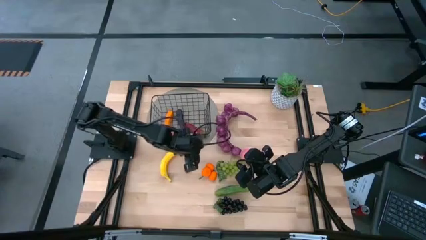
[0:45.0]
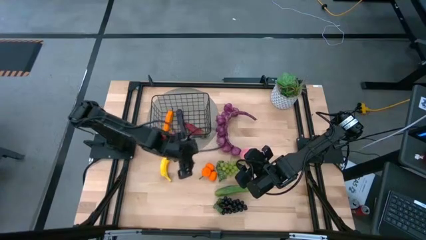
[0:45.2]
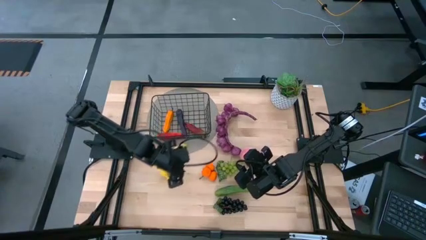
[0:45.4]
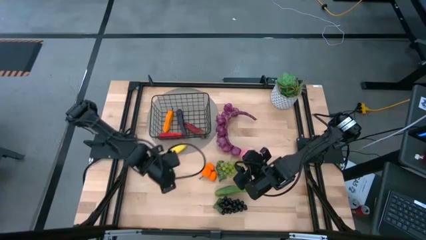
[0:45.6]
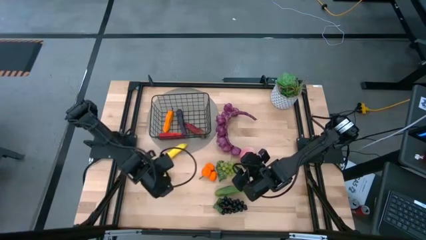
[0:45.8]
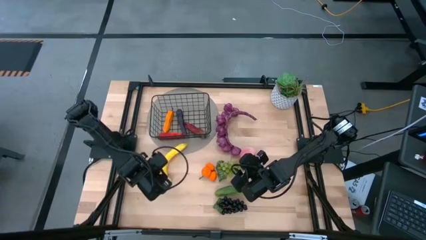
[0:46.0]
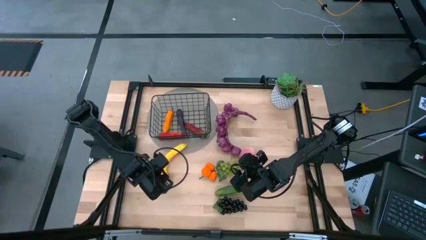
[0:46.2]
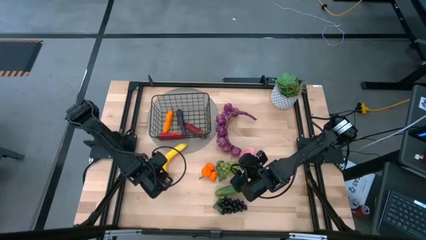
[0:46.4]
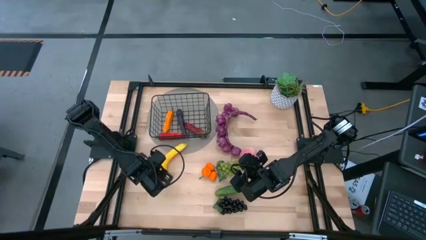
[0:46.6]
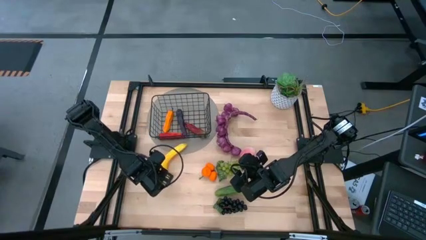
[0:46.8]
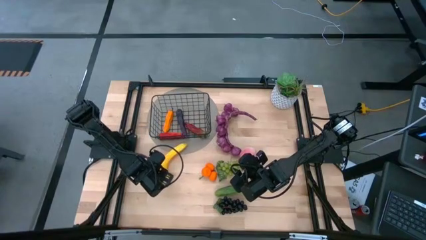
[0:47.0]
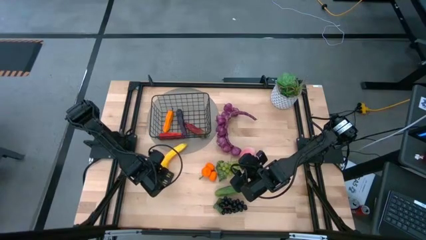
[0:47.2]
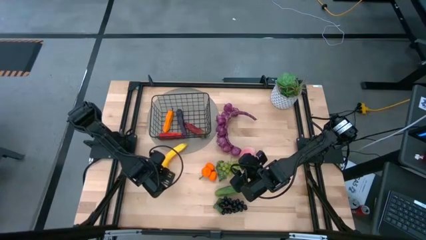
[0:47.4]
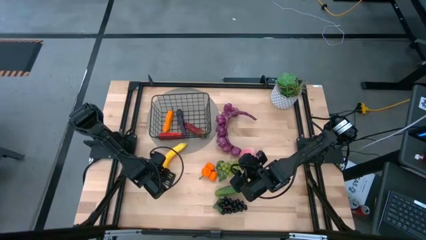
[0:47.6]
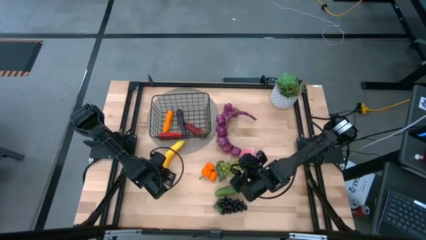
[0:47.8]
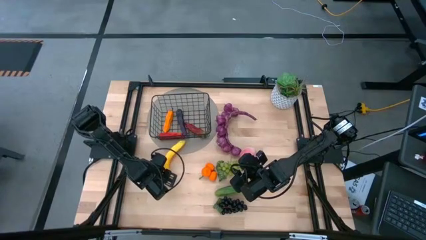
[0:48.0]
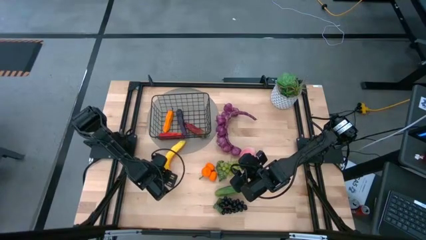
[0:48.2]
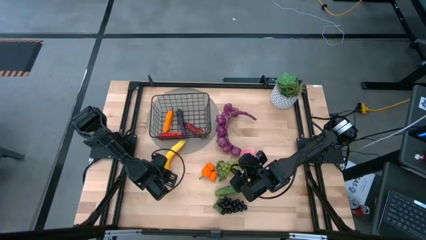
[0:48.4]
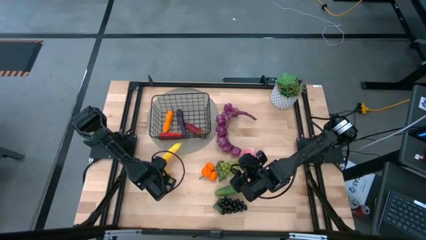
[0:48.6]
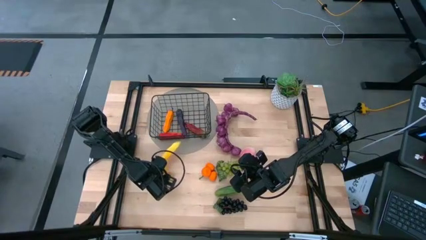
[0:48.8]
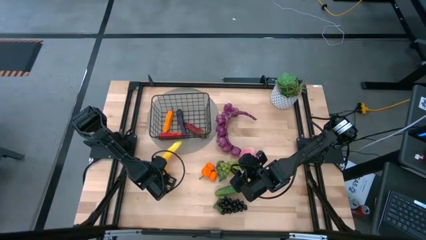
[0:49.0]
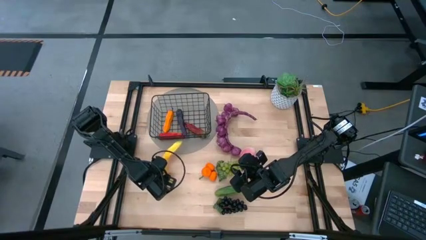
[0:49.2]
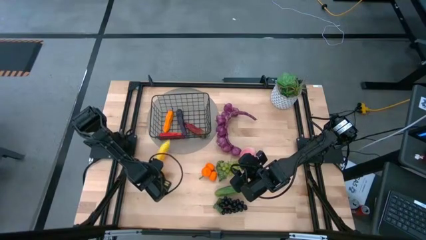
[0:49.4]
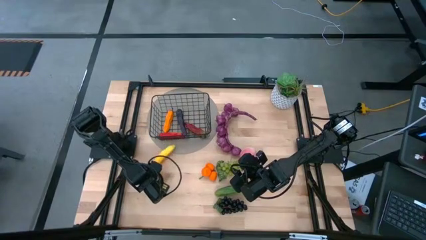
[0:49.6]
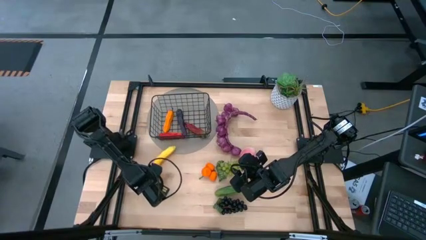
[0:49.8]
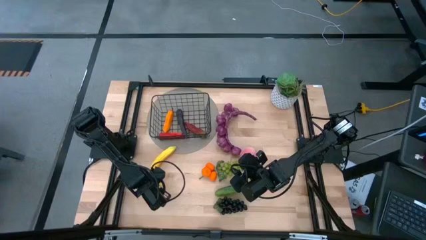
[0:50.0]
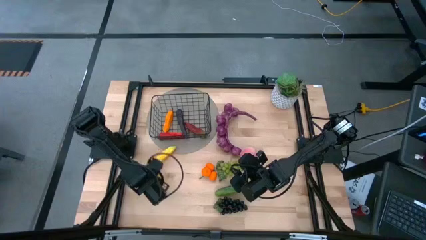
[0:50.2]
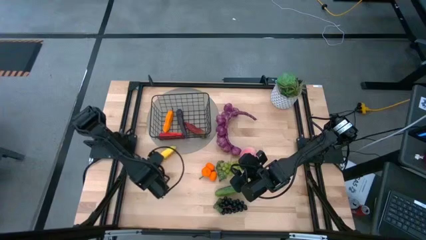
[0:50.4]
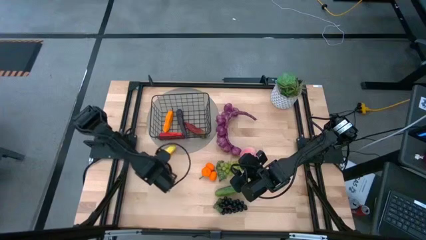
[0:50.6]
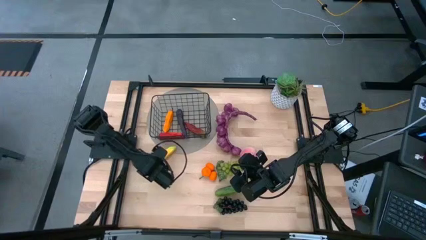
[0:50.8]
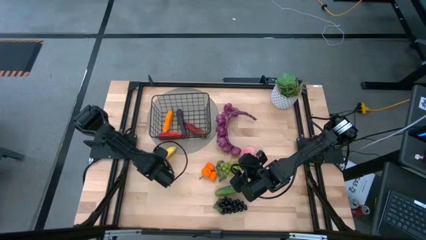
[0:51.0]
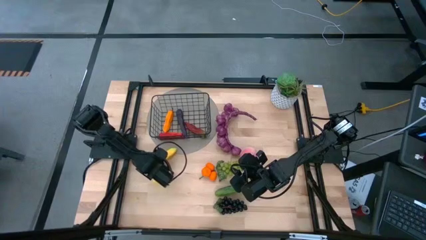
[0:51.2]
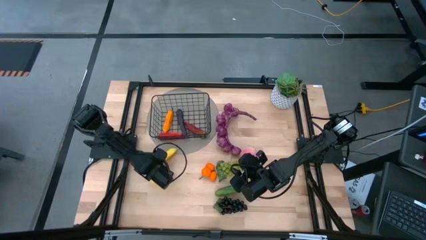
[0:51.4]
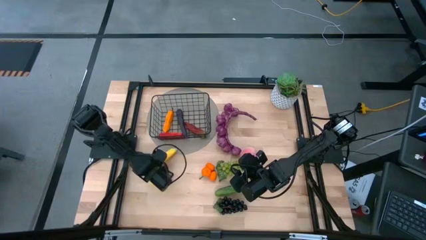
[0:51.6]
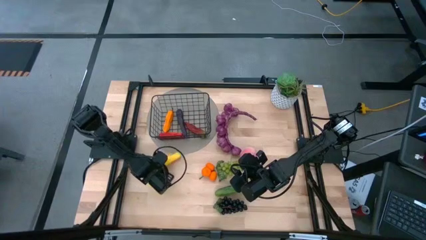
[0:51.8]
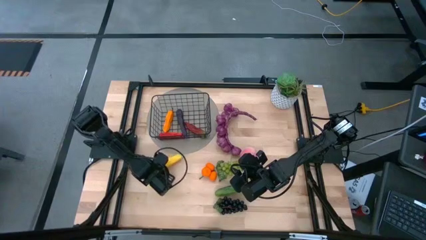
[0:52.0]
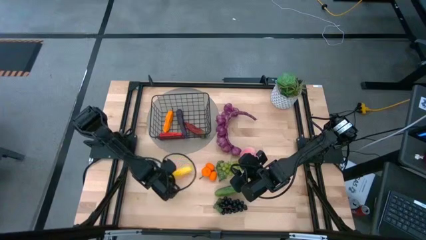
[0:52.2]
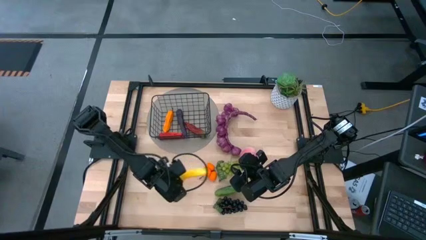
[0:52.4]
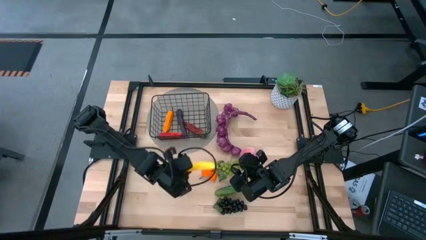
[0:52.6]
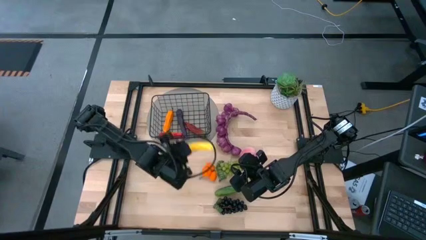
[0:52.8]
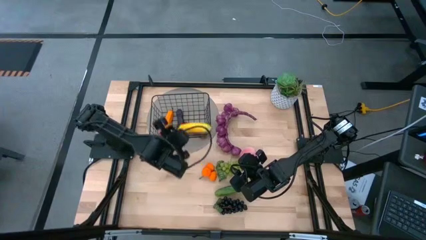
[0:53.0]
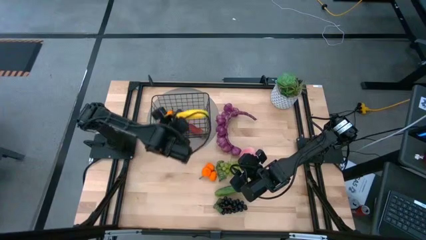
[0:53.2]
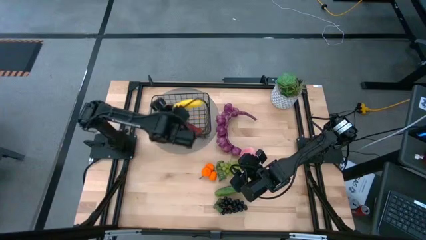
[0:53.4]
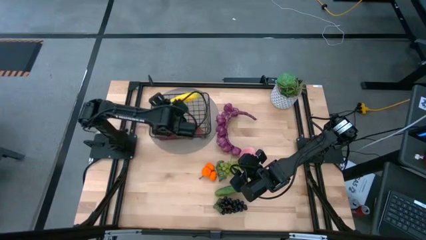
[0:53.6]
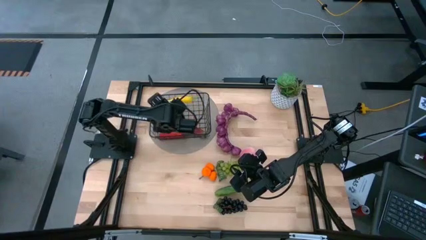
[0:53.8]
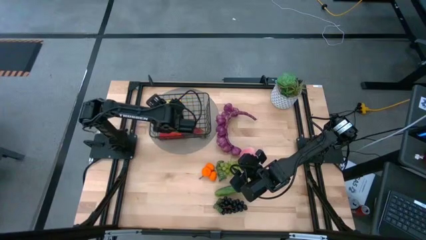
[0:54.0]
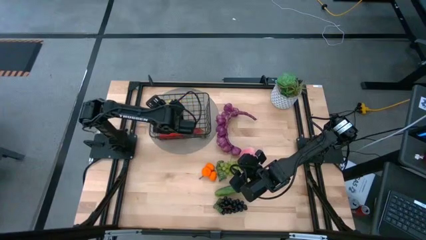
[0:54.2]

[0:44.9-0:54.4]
Task: Build produce basket
Put the banana into the wire basket

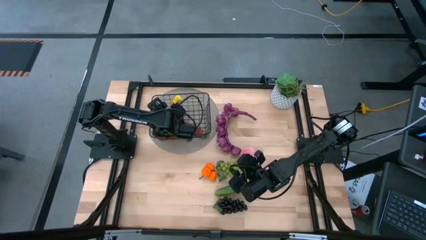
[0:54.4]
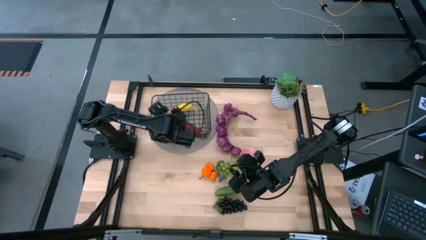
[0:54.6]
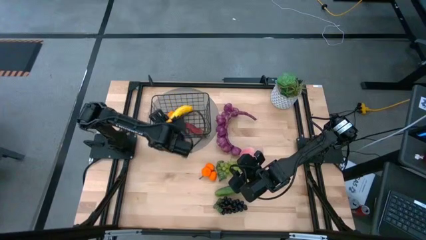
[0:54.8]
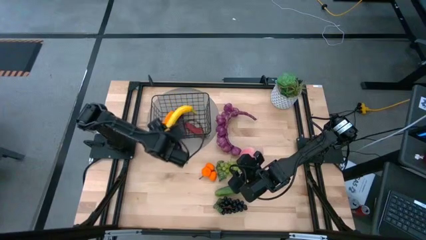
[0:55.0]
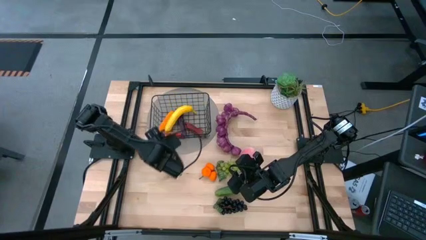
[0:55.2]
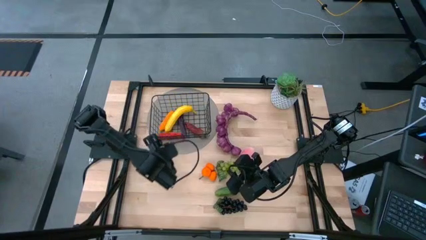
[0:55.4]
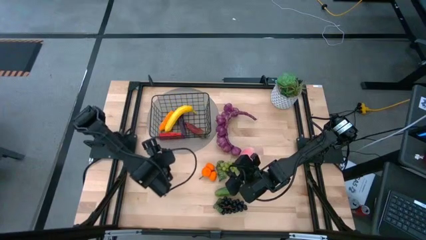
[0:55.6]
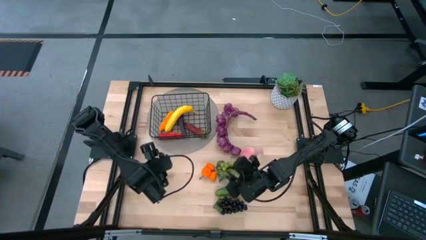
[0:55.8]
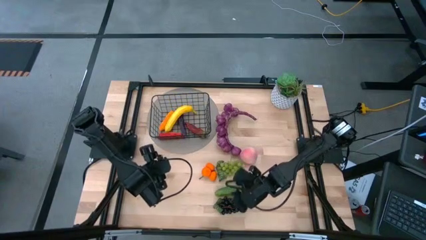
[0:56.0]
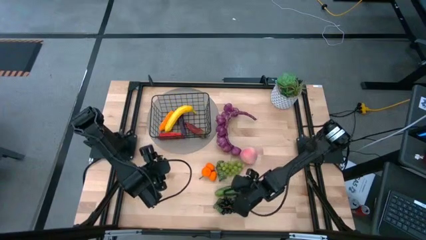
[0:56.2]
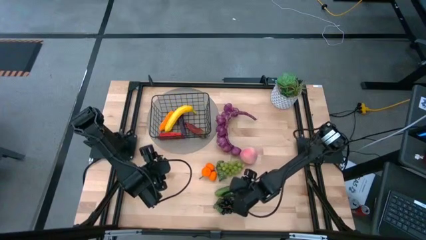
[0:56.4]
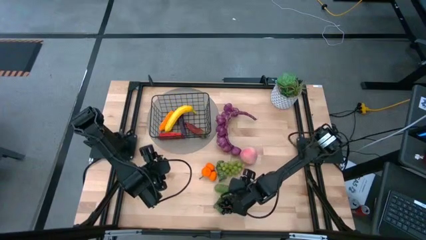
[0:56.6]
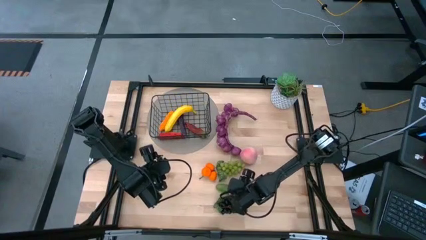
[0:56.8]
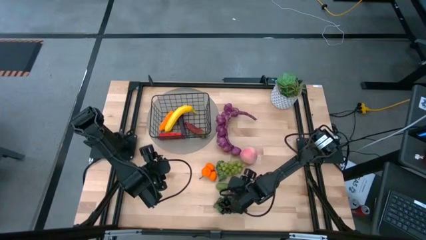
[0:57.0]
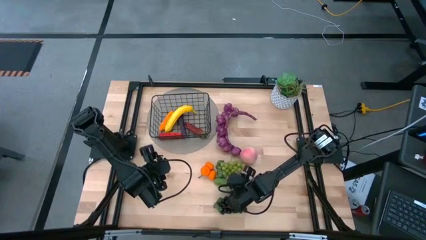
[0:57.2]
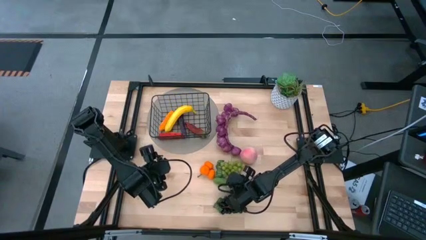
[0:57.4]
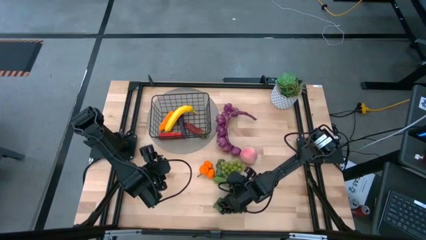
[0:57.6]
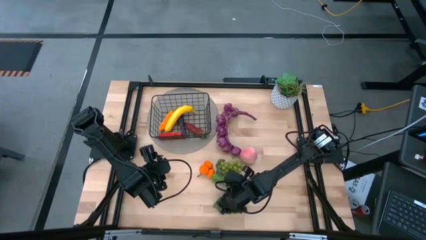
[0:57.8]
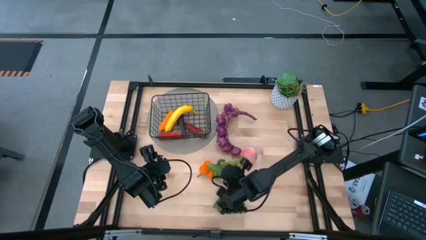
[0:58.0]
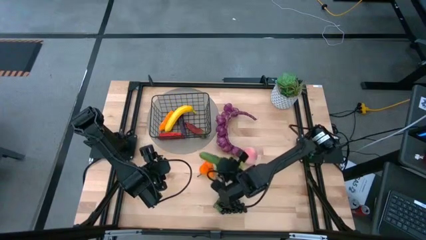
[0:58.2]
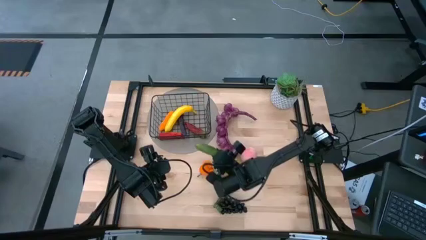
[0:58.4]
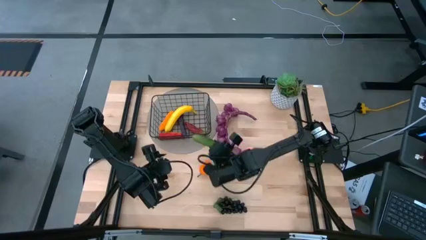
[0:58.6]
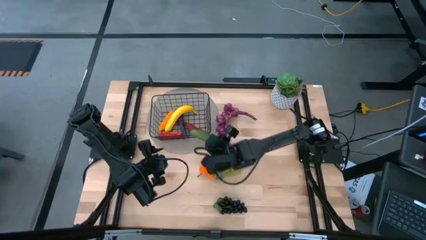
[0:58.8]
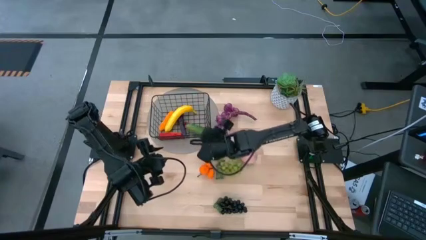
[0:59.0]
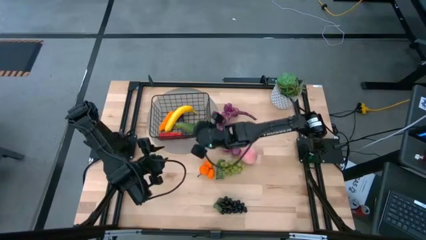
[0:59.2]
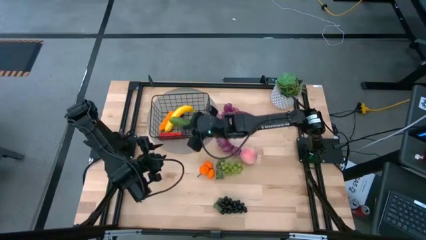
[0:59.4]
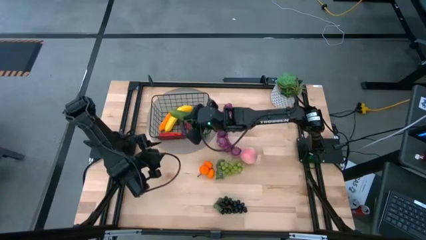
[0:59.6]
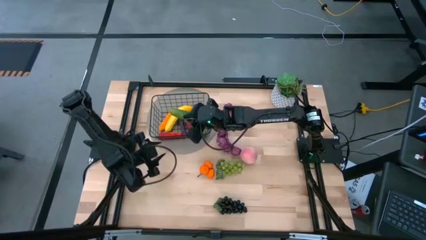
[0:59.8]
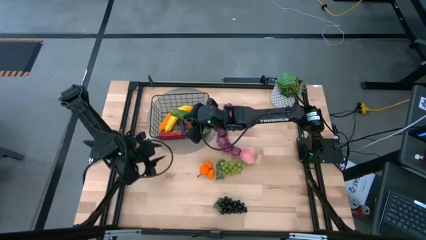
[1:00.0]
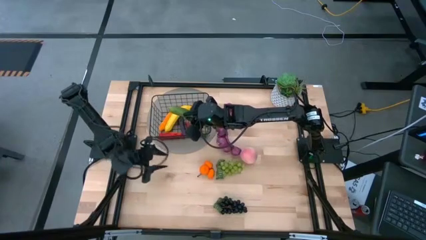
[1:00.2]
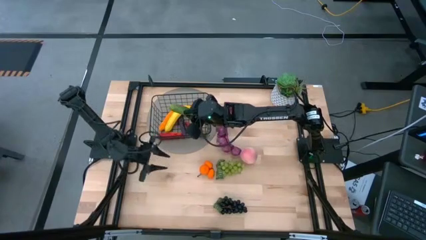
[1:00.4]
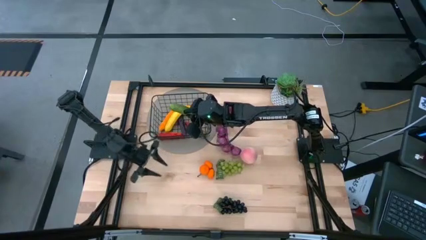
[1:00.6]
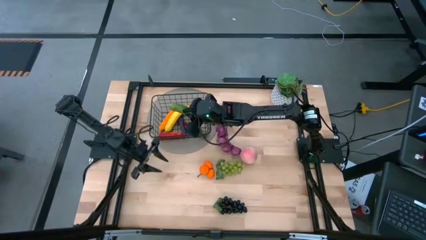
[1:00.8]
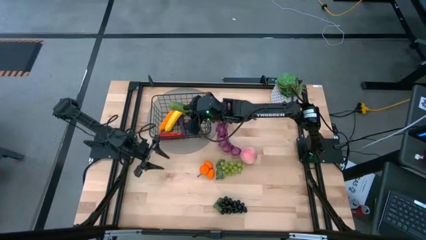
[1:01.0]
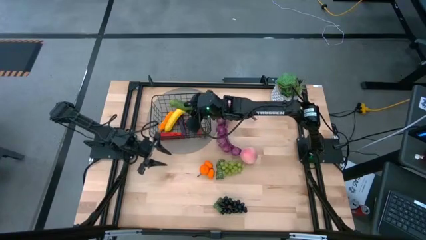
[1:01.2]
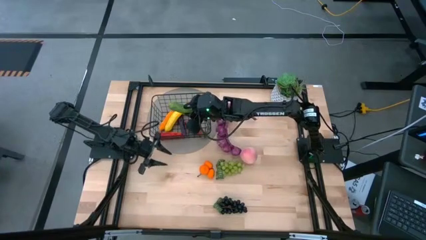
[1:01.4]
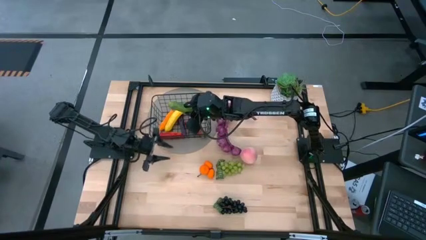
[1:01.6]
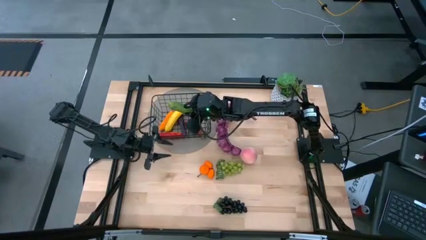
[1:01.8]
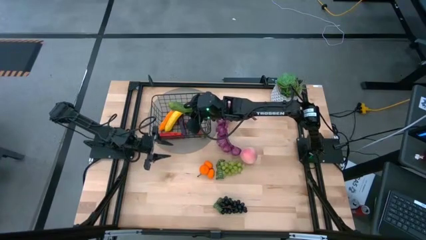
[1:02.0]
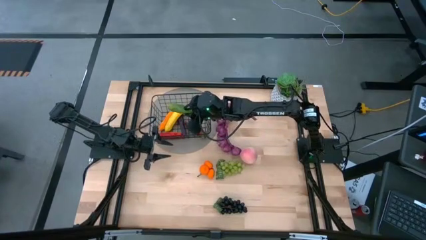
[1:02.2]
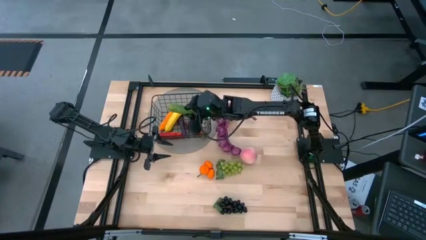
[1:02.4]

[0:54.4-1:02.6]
Put the cucumber into the wire basket
